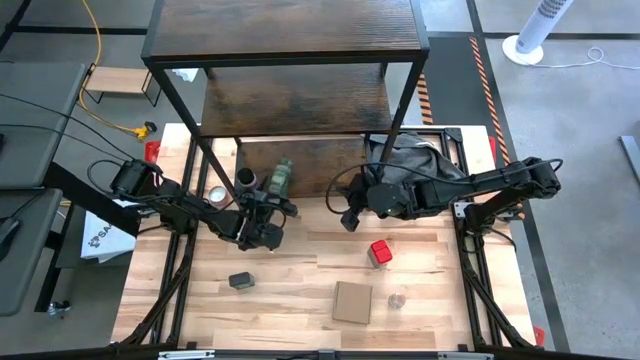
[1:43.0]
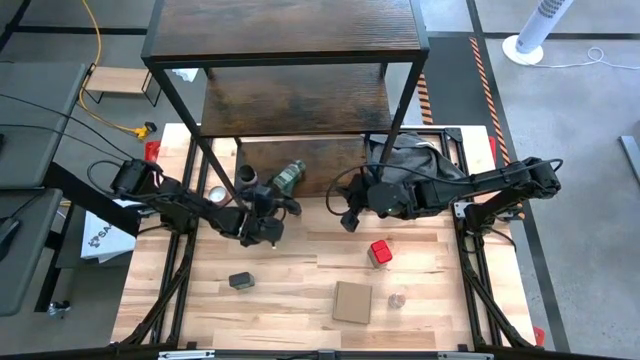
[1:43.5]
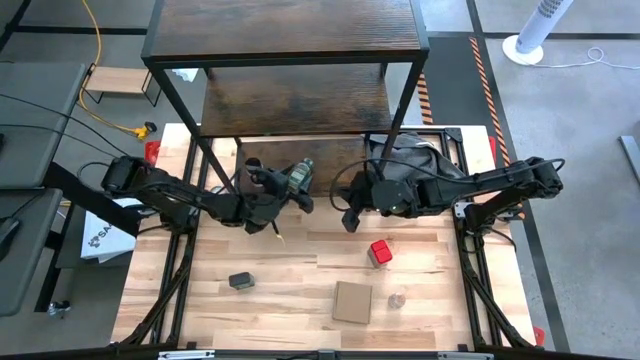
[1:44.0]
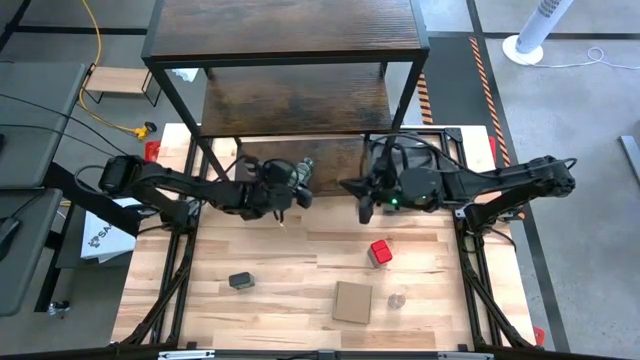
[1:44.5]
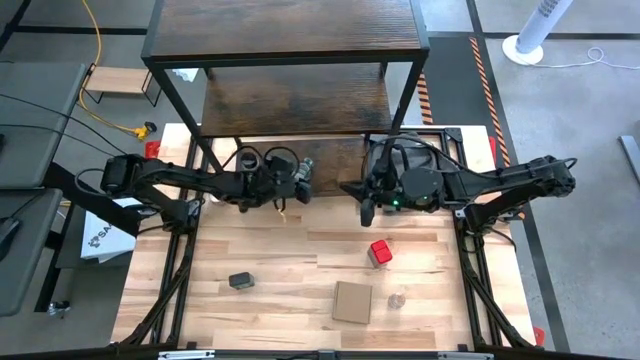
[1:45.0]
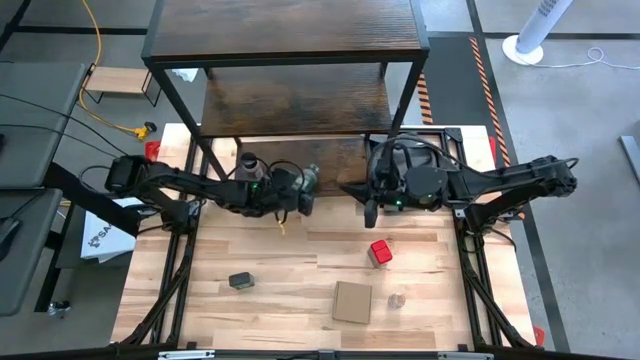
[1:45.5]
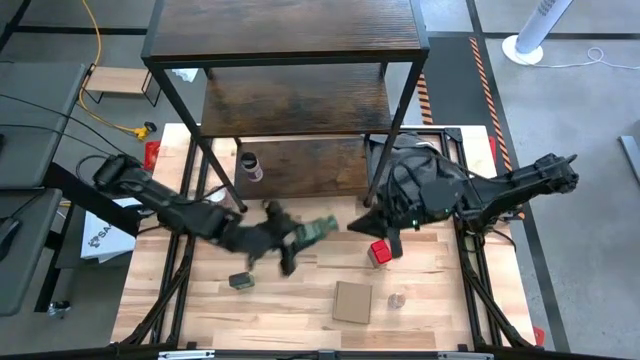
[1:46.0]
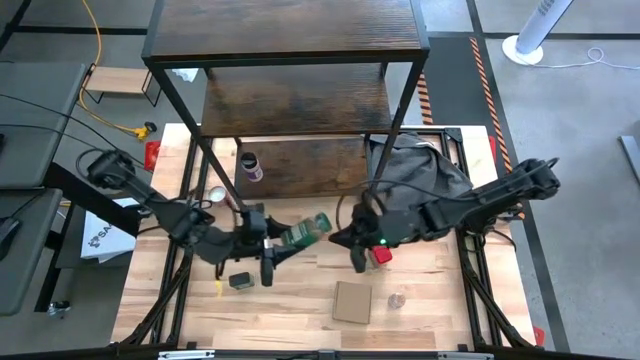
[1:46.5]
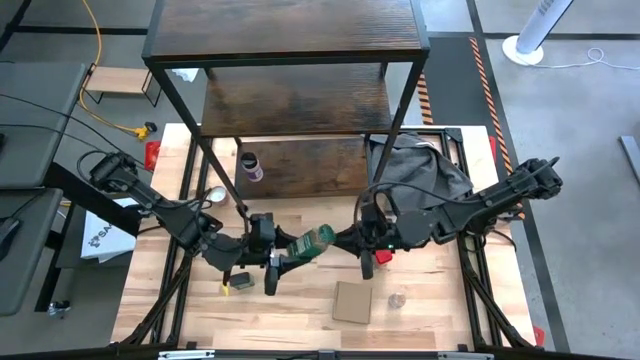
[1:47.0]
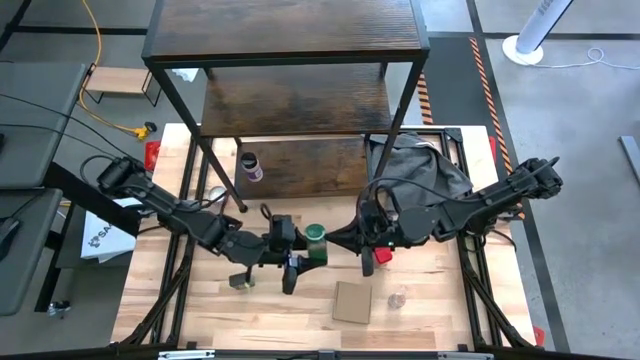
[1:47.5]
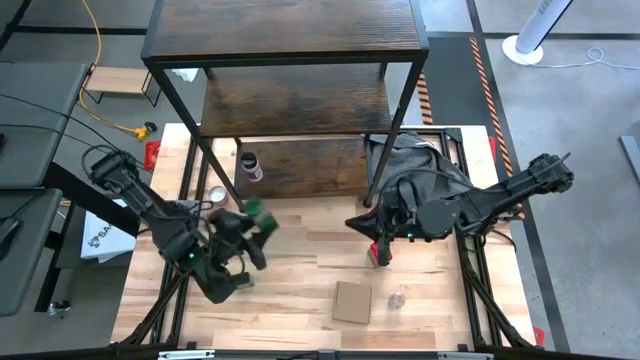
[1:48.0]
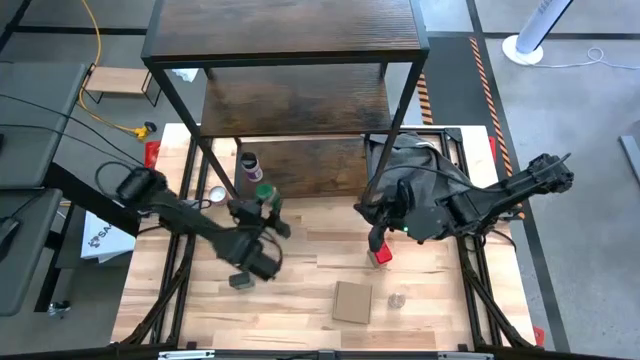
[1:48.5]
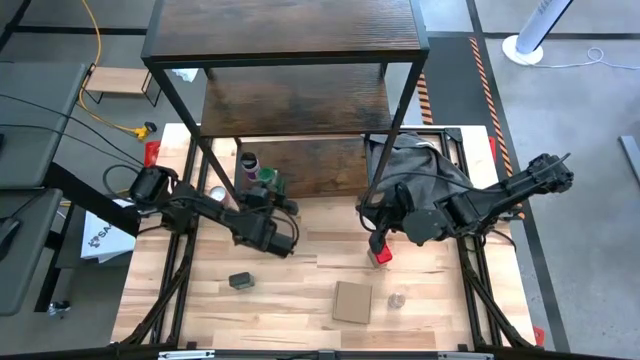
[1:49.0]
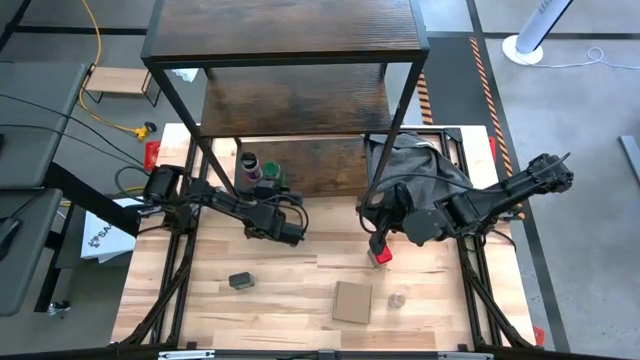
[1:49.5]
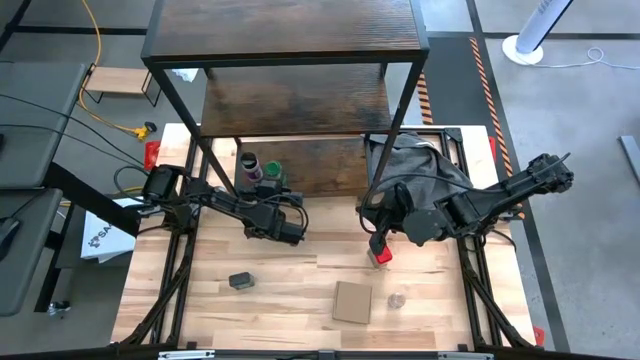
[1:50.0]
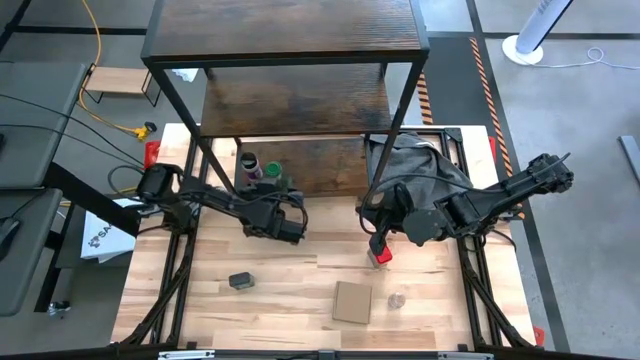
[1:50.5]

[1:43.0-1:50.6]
Task: Shelf spices
Put the green seasoning bottle on the shelf

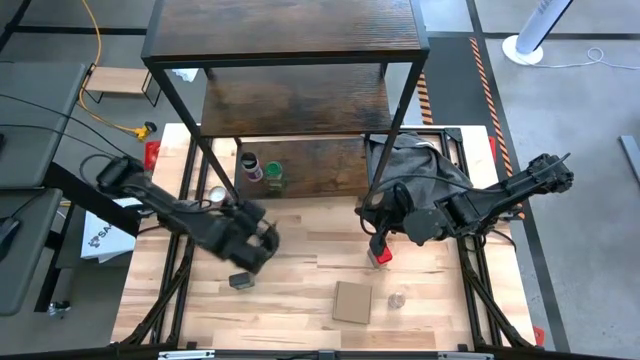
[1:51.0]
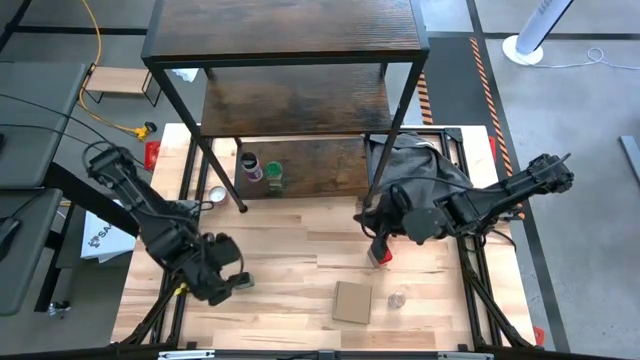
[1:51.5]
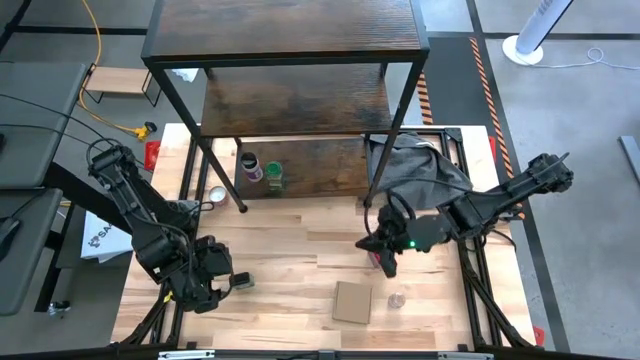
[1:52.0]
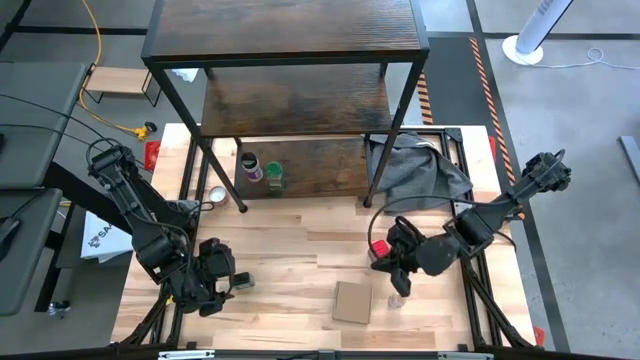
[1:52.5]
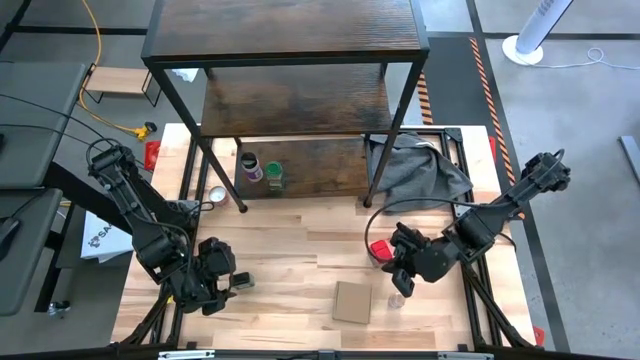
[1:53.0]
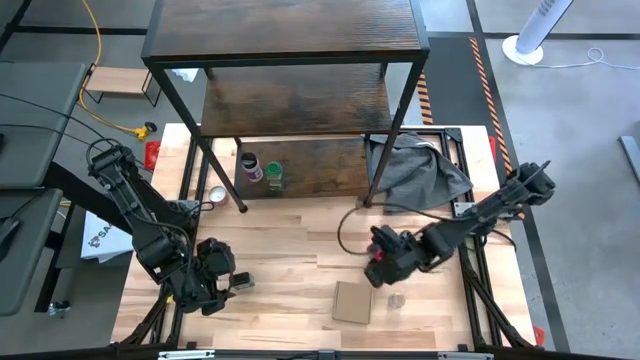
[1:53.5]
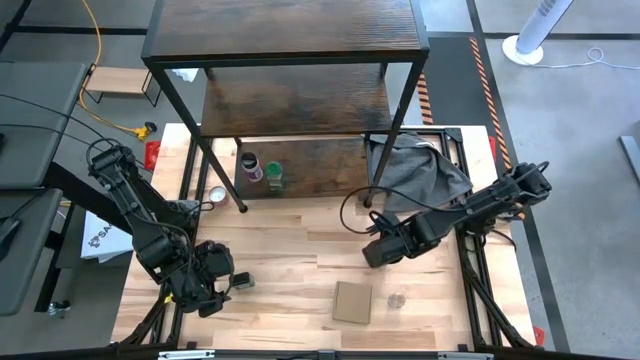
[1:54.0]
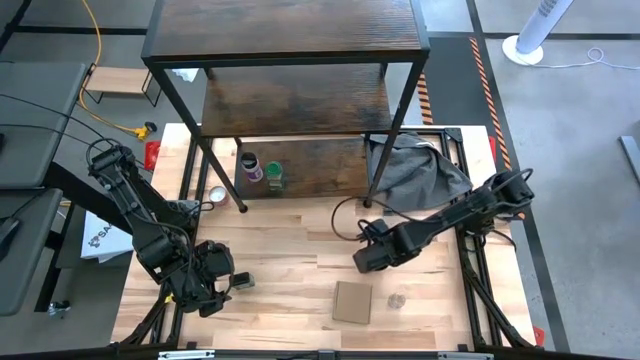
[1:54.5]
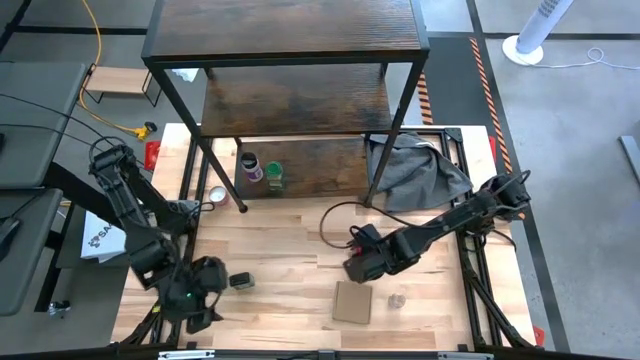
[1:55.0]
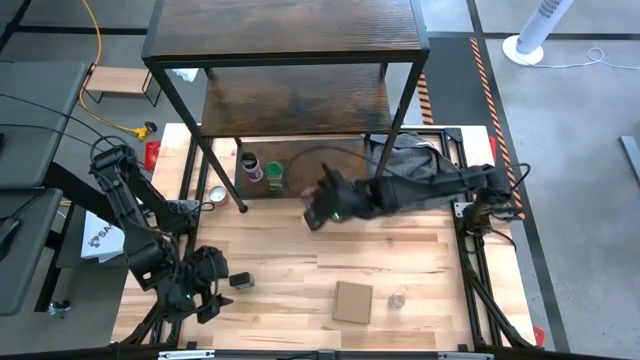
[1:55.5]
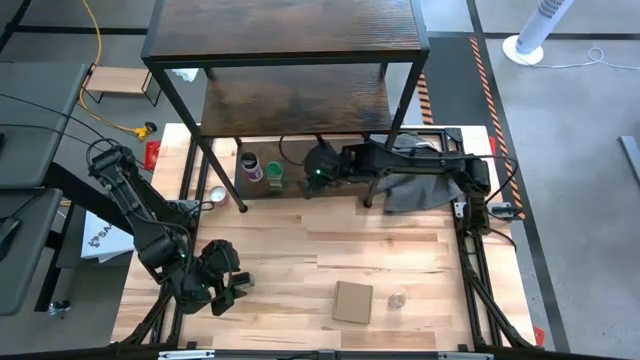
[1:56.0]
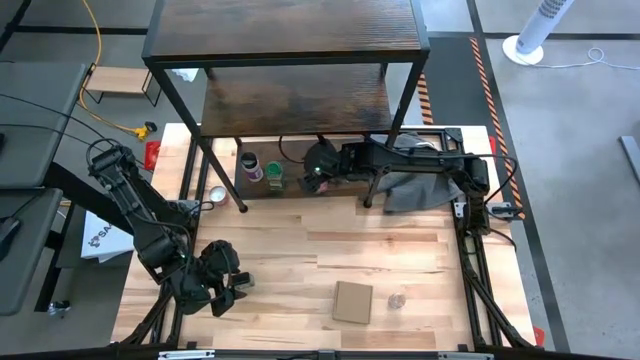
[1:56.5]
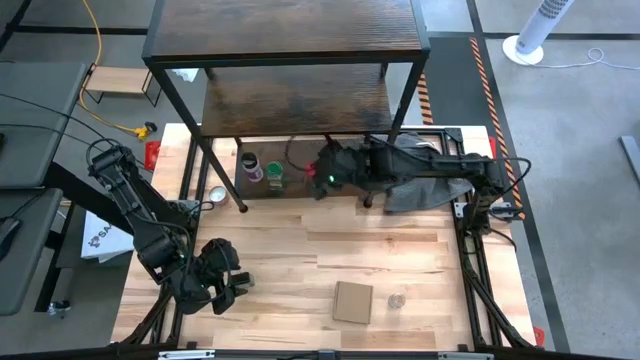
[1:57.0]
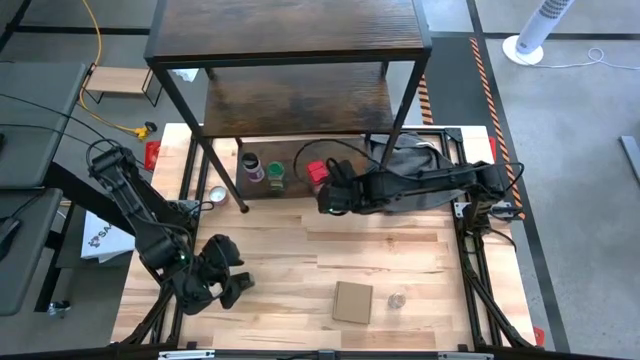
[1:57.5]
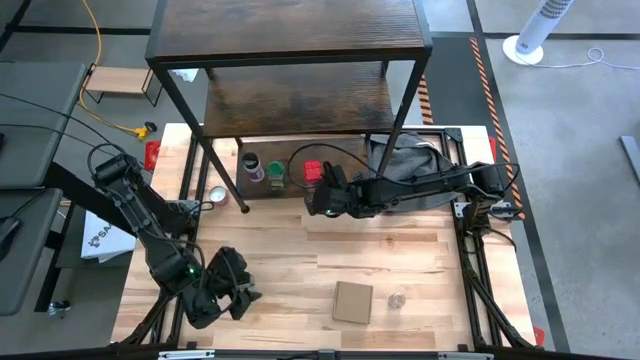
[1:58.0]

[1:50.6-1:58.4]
Put the red seasoning can on the shelf

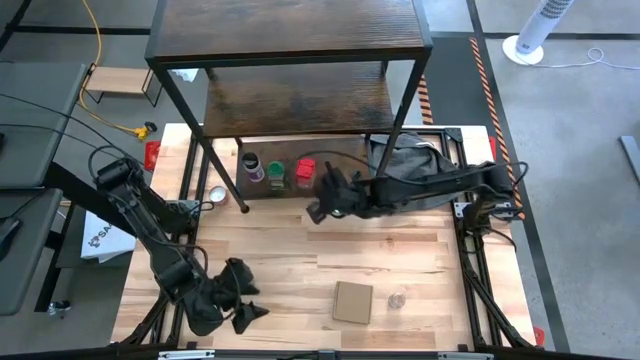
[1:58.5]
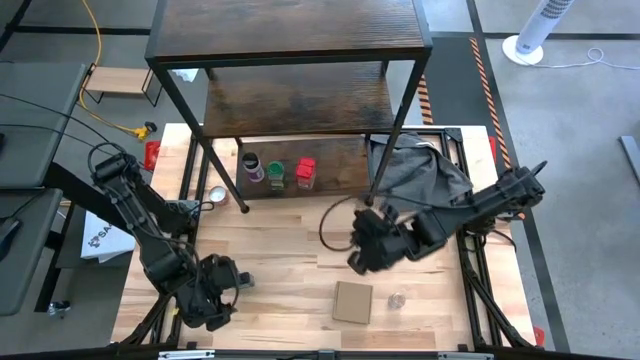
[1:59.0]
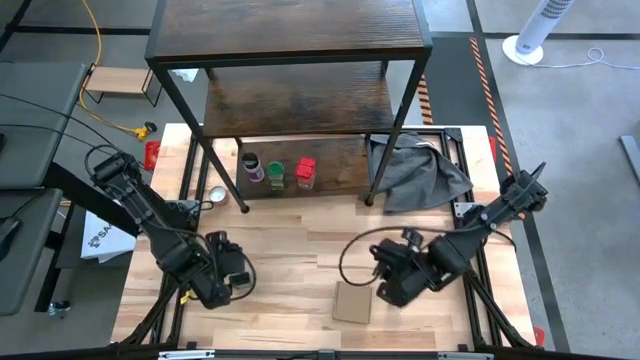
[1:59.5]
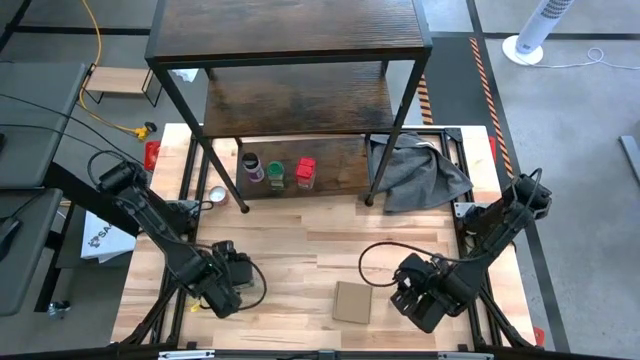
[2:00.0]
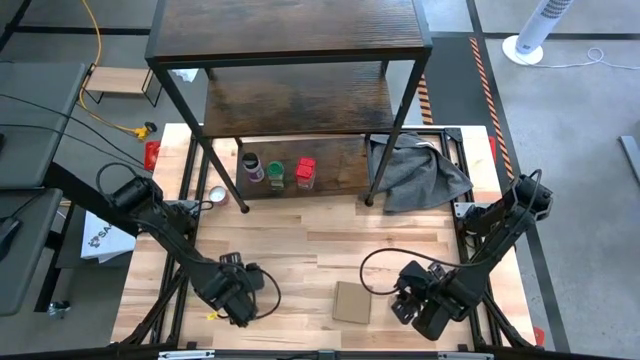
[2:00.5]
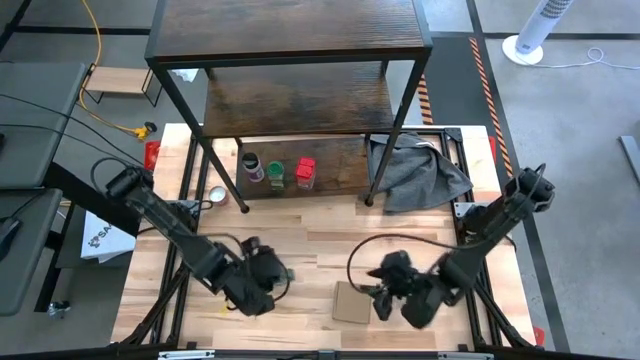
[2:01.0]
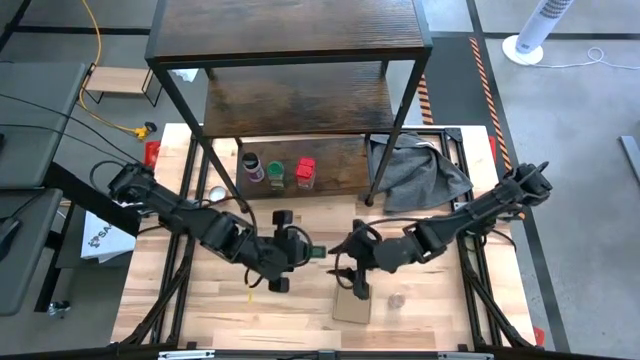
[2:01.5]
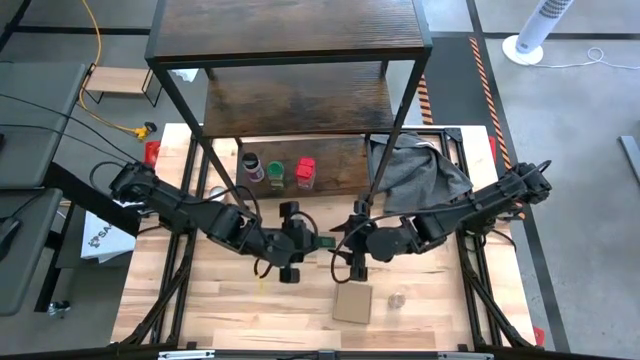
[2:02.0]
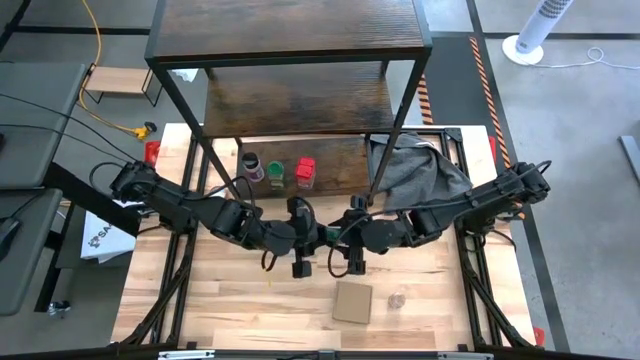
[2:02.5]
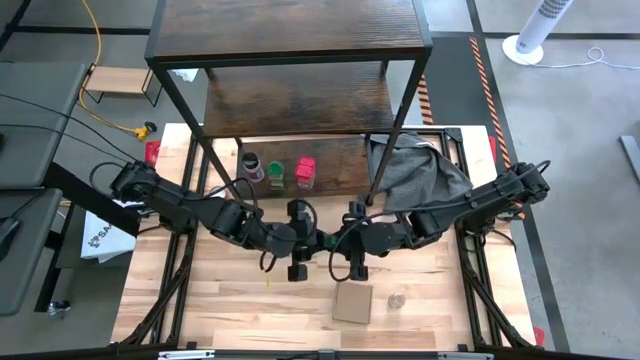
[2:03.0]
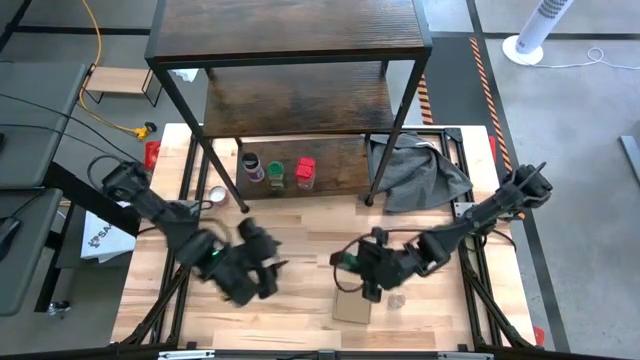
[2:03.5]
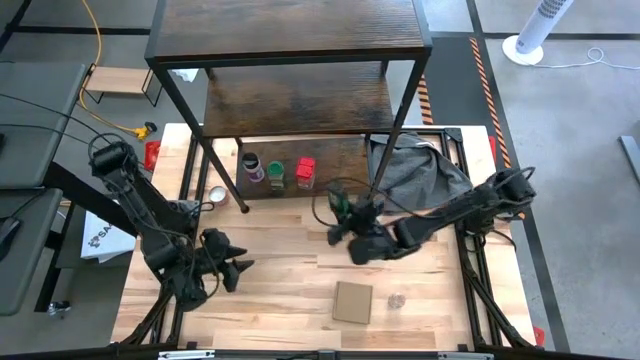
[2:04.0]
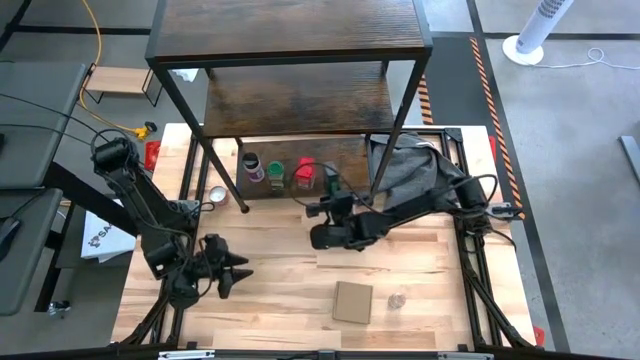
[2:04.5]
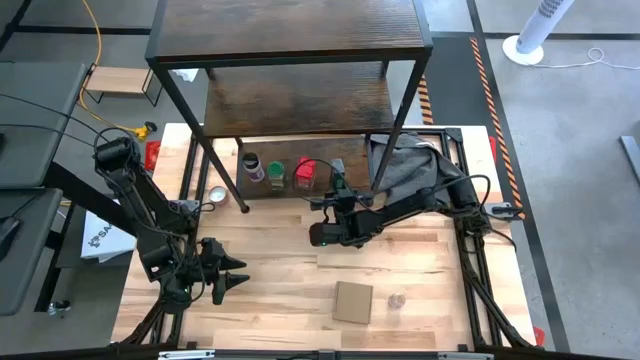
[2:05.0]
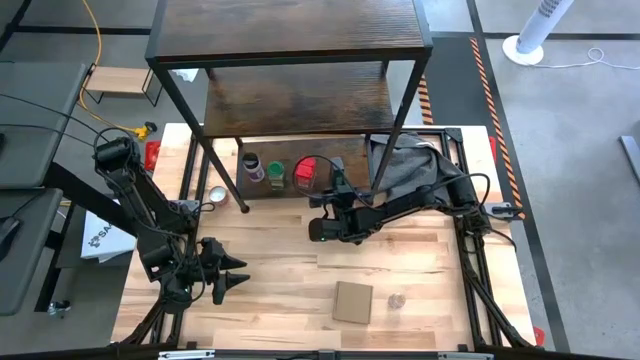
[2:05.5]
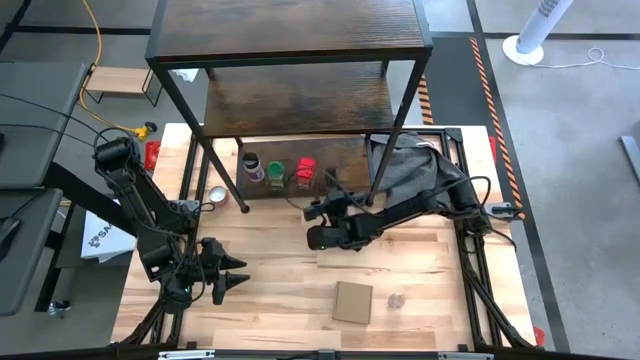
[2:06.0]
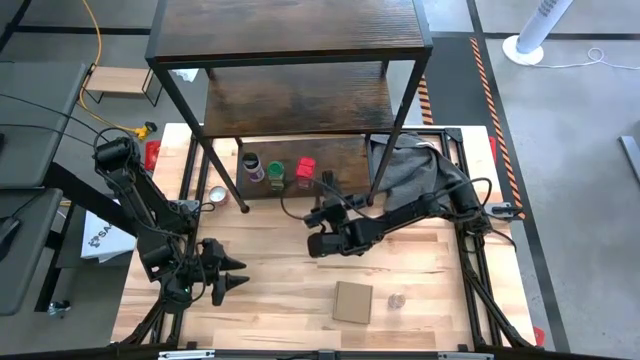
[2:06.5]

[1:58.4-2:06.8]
Put the black seasoning can on the shelf
